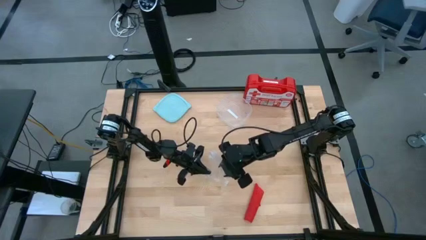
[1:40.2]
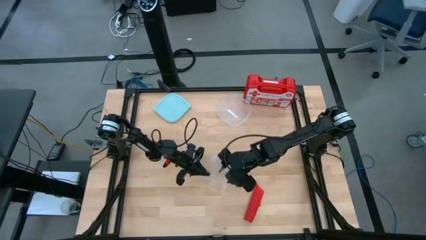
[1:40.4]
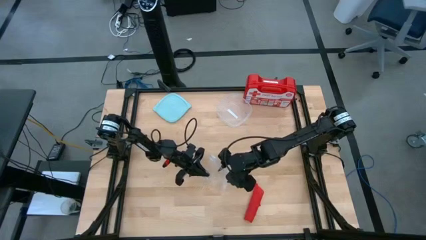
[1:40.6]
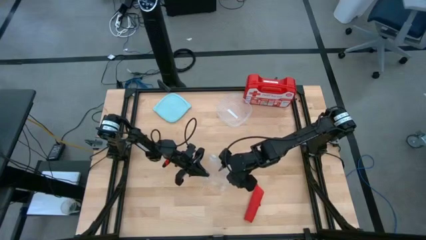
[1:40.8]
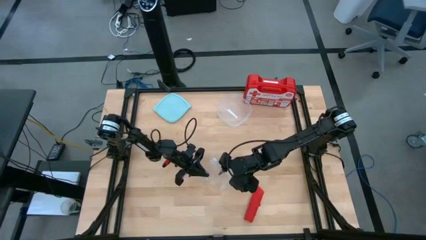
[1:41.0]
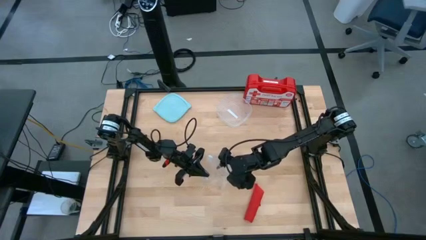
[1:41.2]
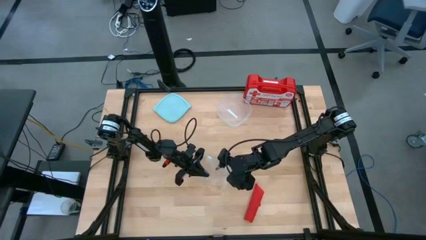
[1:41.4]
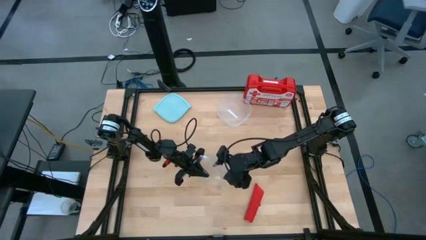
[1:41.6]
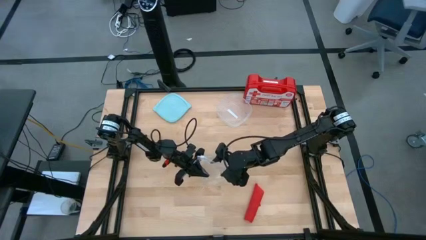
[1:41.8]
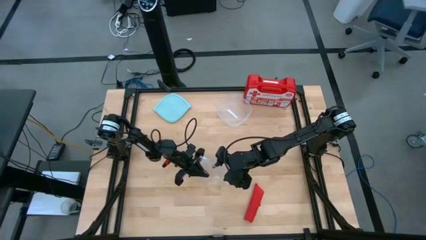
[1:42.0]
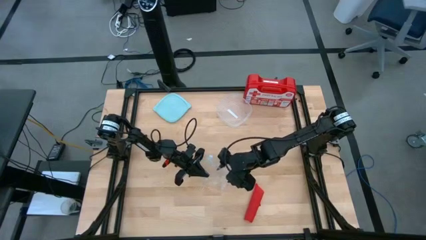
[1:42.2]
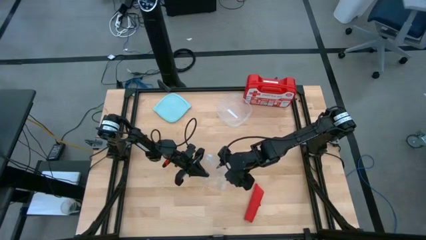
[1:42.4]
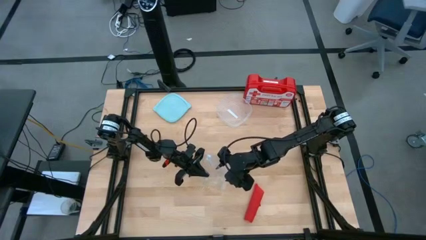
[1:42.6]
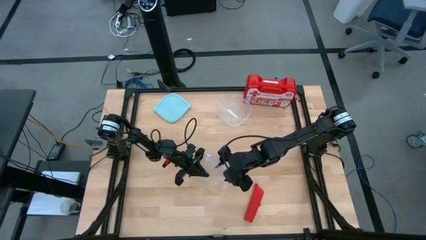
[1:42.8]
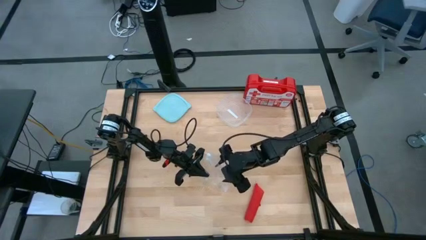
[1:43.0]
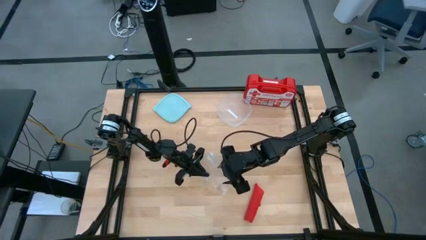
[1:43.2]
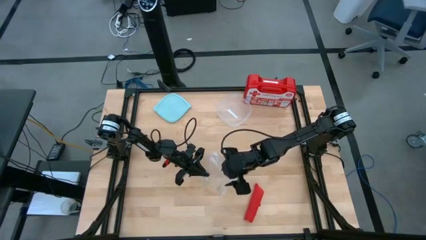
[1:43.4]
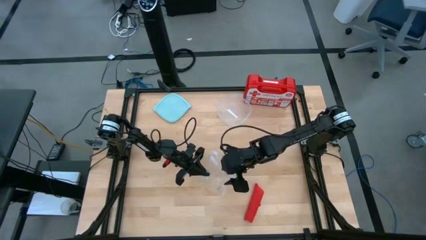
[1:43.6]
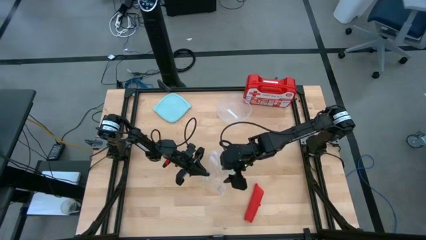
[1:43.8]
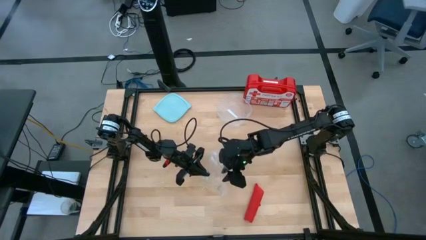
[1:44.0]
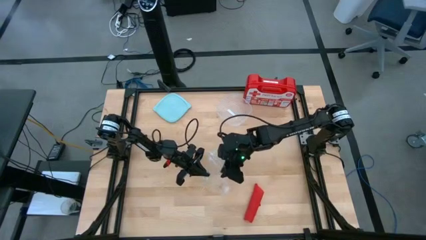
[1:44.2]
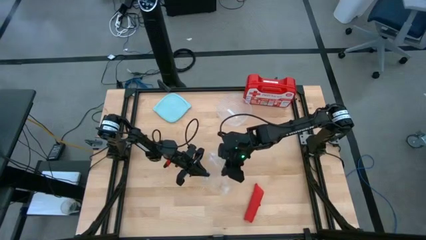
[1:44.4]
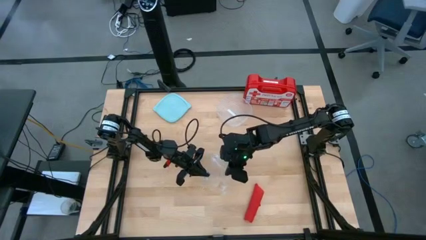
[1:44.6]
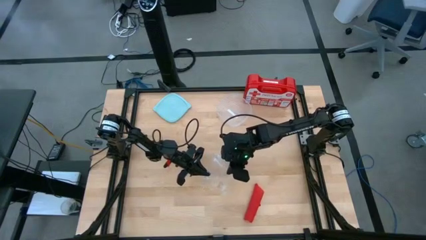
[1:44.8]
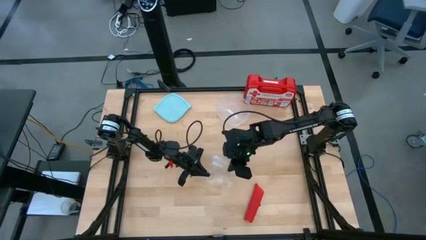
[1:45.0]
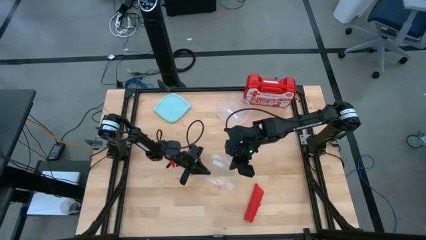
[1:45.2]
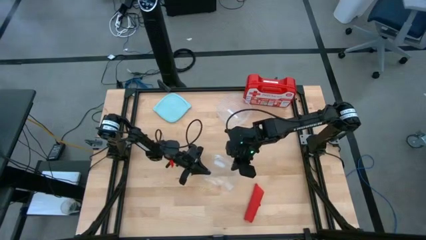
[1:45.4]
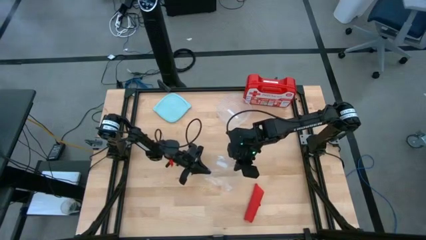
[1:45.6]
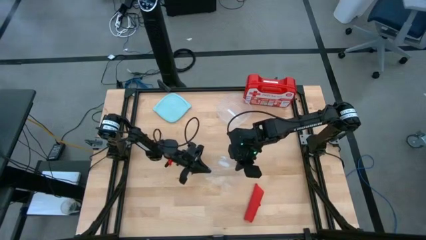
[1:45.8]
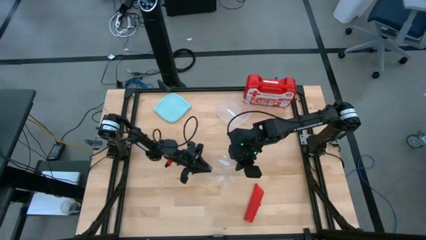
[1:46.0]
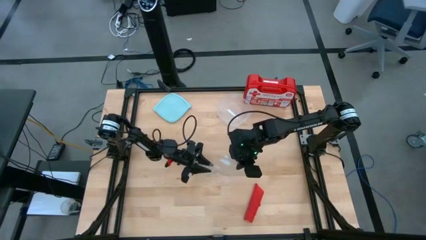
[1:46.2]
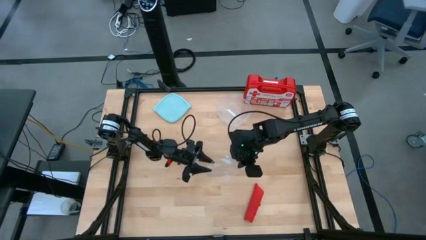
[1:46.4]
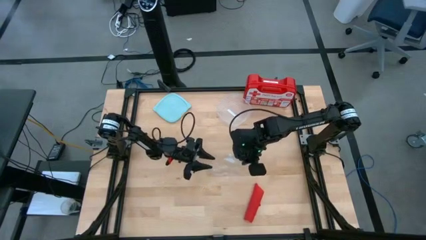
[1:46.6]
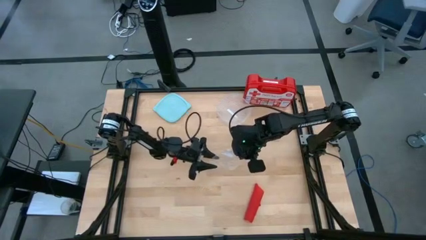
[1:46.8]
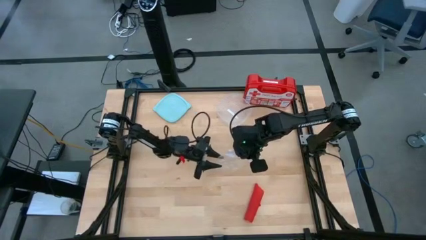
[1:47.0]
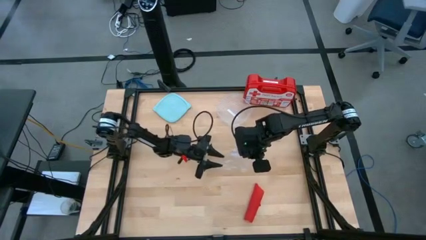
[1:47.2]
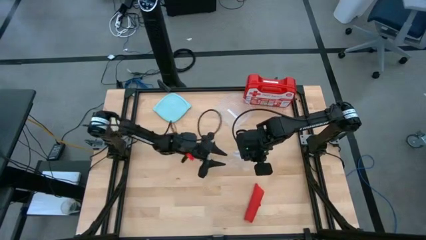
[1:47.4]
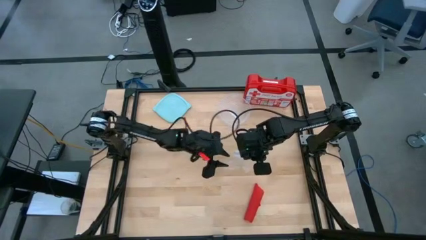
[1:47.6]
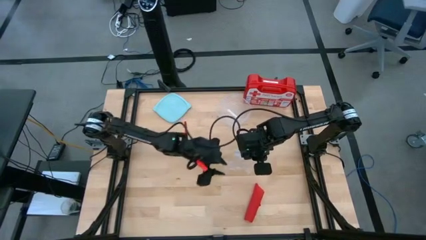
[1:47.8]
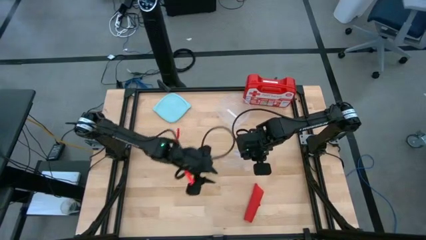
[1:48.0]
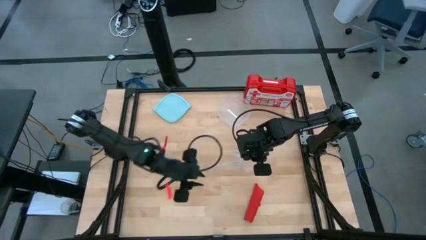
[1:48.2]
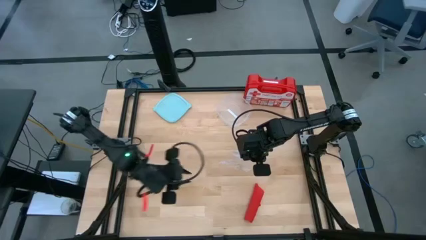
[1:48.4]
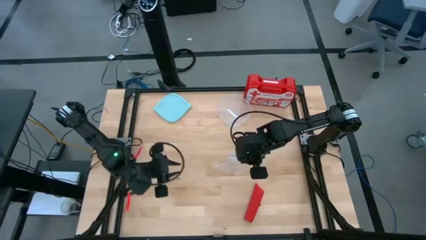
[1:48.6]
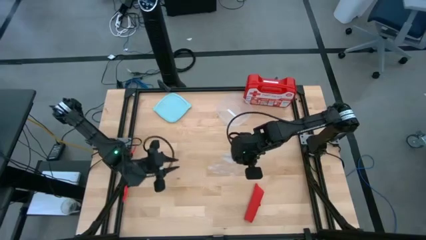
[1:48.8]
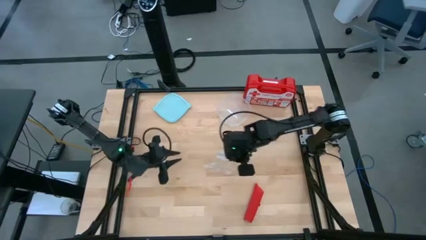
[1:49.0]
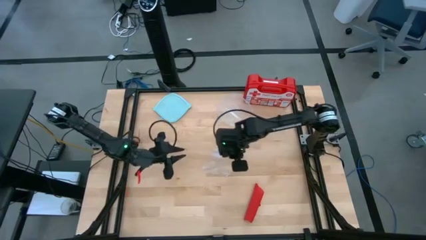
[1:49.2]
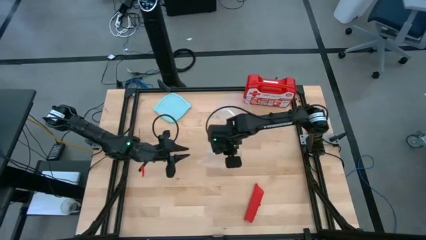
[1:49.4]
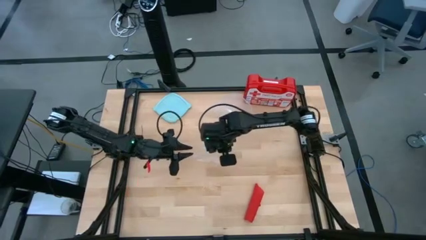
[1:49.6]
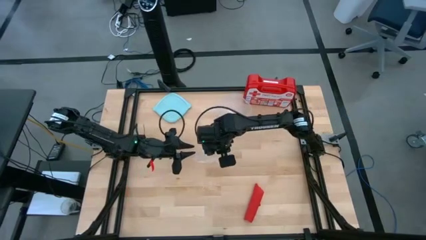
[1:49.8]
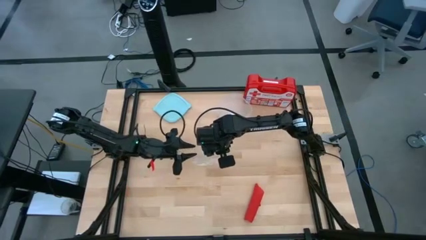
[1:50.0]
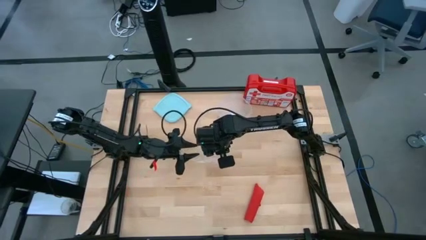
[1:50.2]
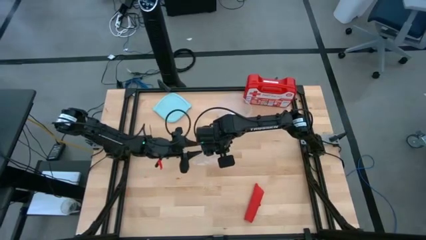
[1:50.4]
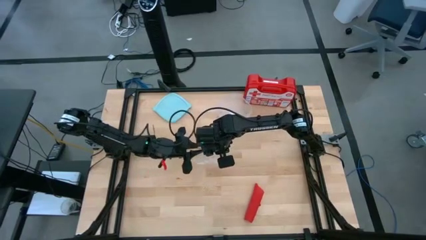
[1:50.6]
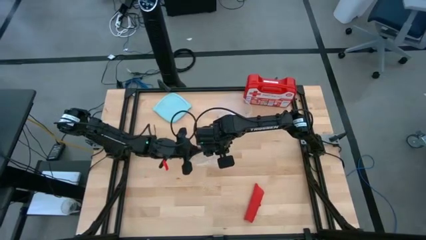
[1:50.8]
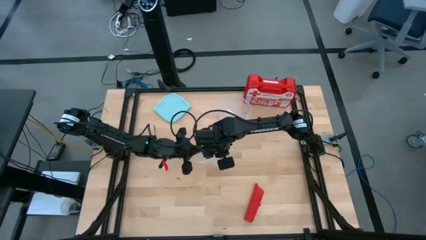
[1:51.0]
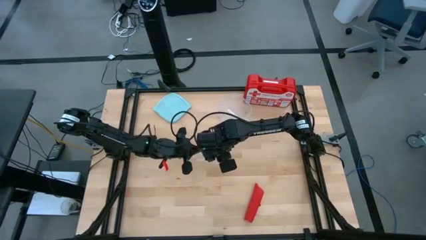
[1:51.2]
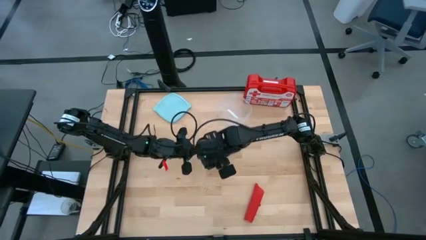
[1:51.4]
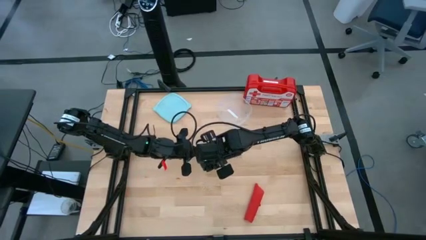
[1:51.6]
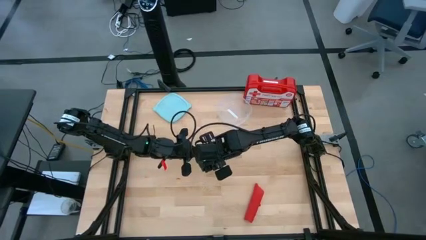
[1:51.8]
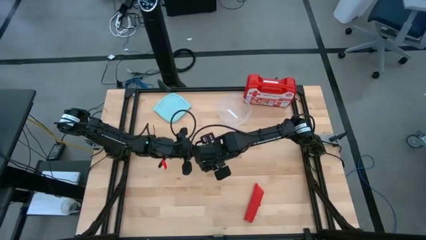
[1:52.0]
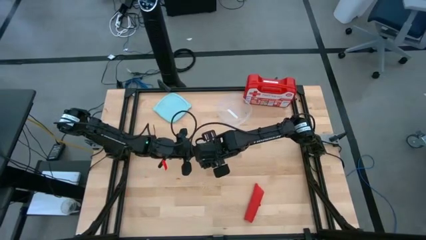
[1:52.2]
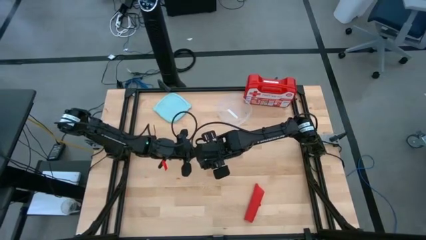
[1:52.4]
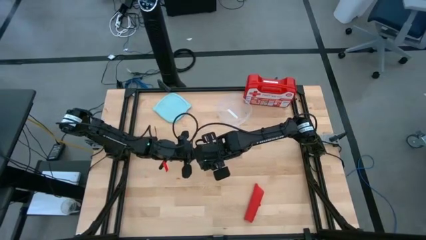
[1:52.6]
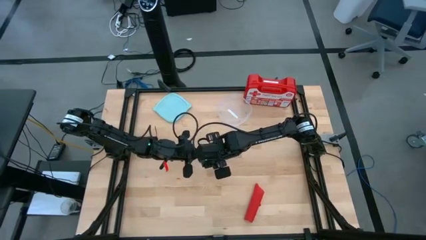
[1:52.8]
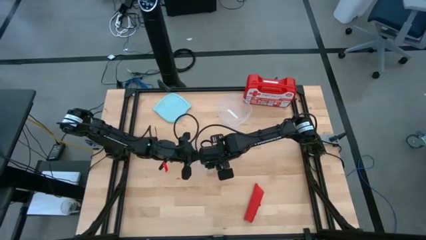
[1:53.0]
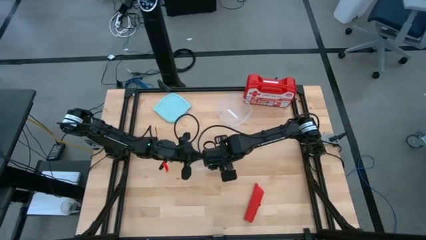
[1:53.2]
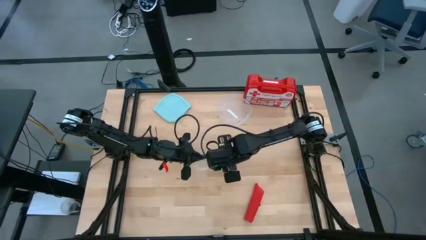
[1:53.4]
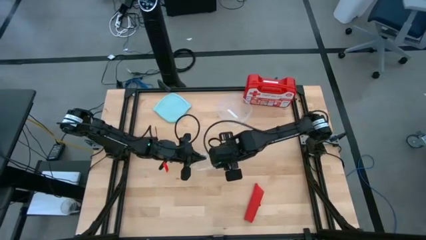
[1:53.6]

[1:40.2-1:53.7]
Task: Roll bandage
Open the transparent zip bag
